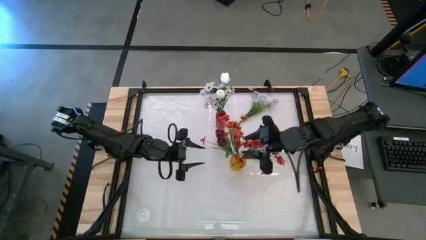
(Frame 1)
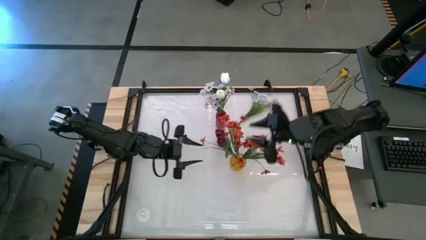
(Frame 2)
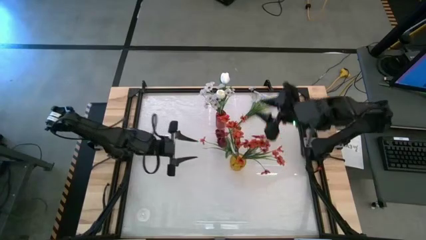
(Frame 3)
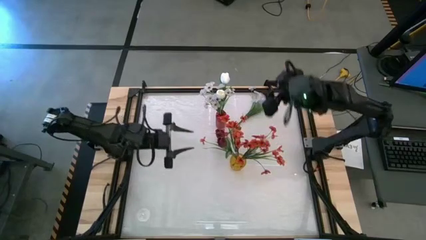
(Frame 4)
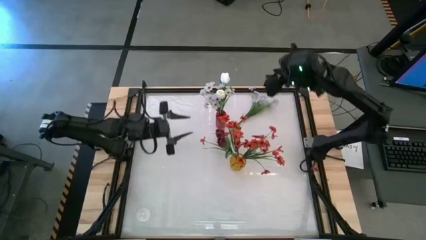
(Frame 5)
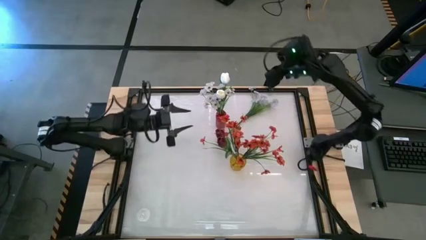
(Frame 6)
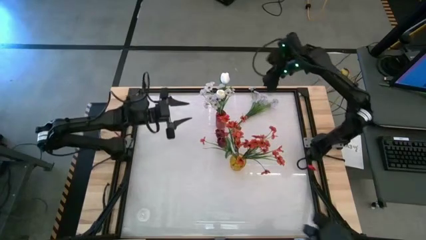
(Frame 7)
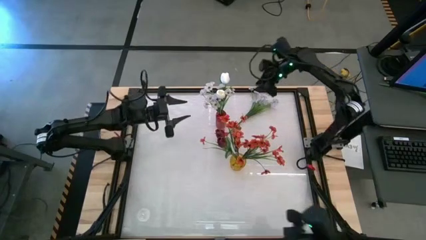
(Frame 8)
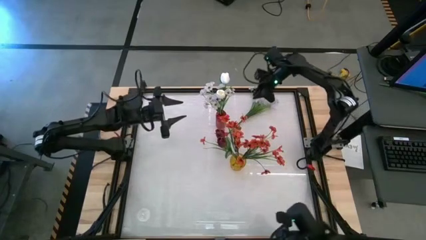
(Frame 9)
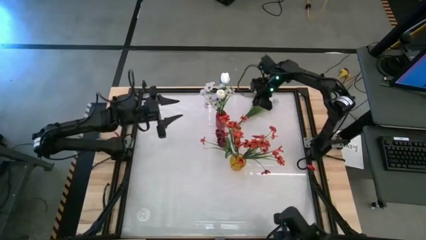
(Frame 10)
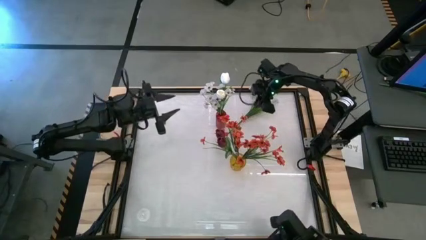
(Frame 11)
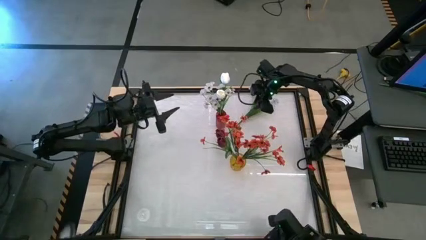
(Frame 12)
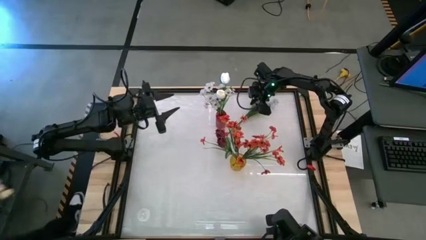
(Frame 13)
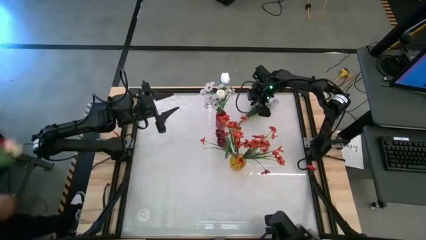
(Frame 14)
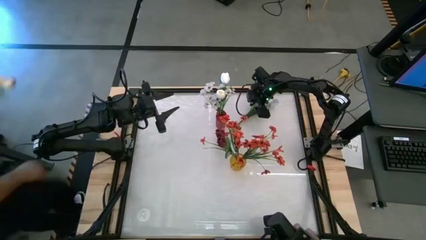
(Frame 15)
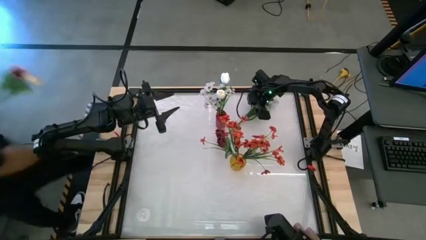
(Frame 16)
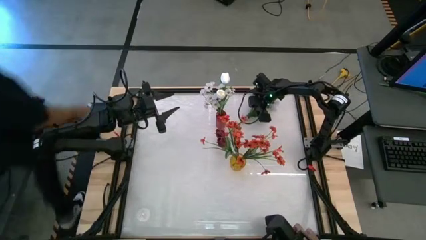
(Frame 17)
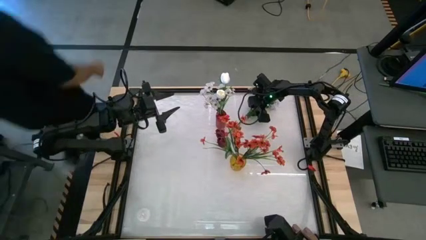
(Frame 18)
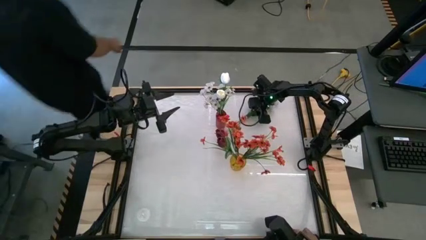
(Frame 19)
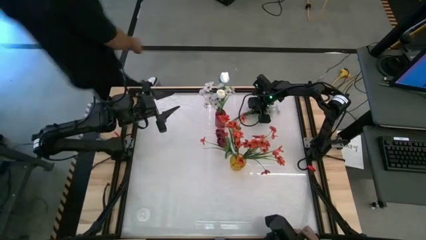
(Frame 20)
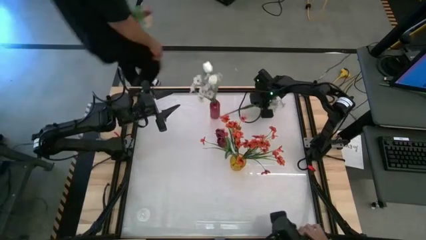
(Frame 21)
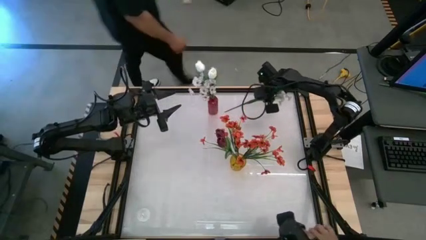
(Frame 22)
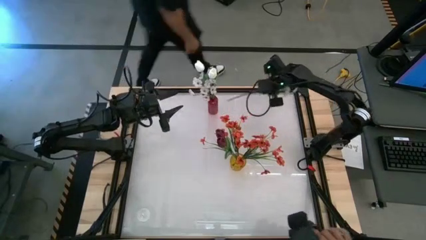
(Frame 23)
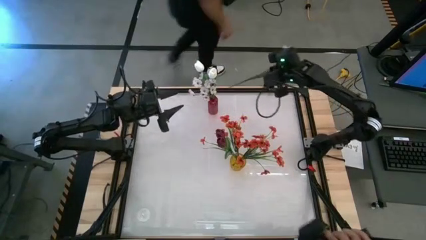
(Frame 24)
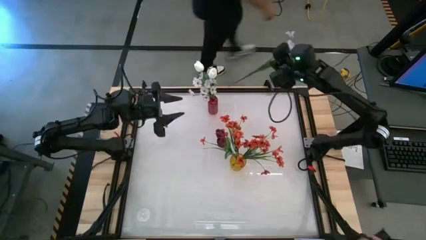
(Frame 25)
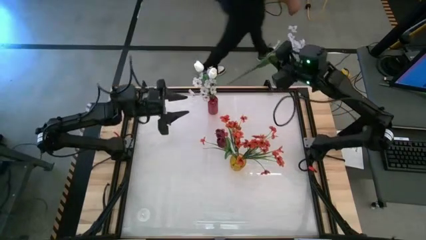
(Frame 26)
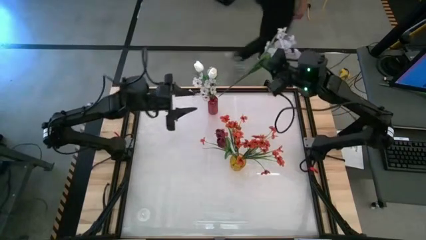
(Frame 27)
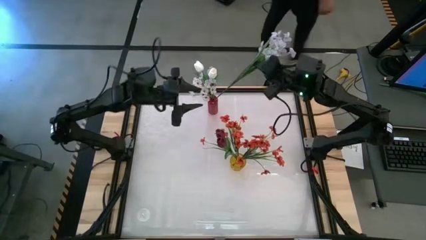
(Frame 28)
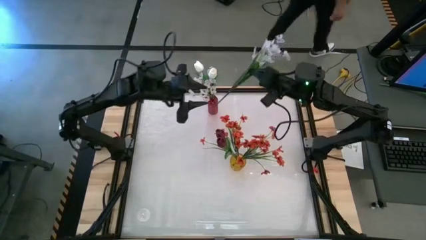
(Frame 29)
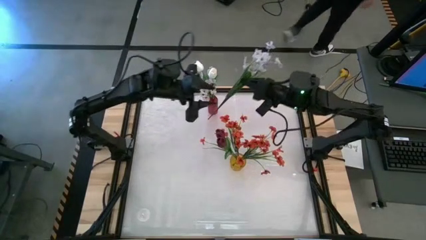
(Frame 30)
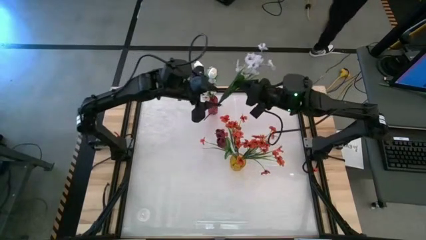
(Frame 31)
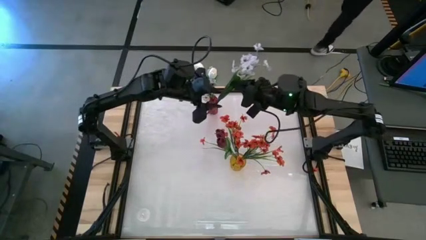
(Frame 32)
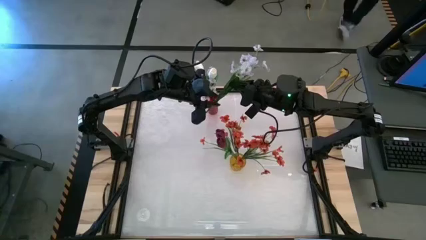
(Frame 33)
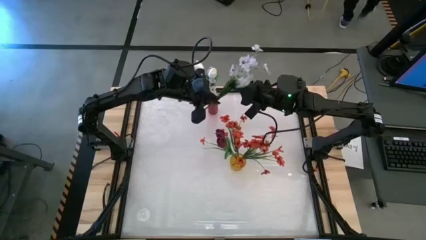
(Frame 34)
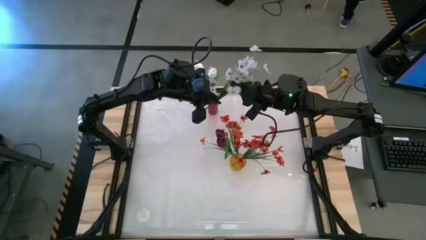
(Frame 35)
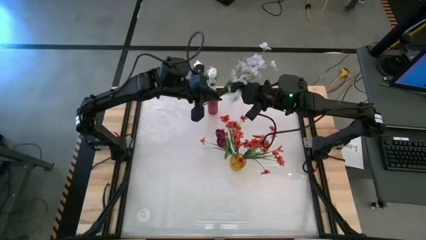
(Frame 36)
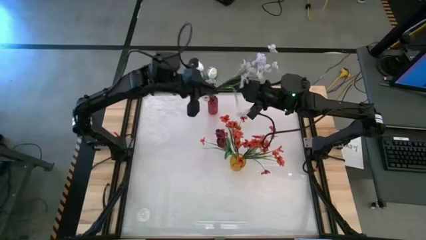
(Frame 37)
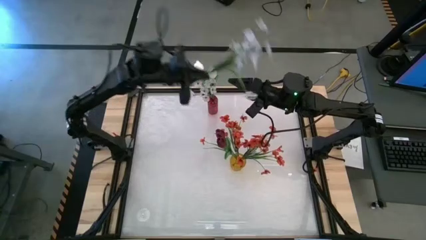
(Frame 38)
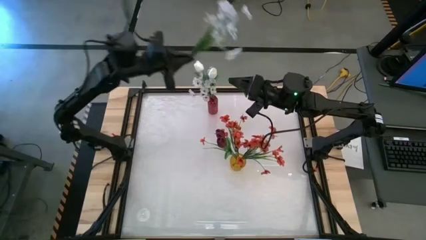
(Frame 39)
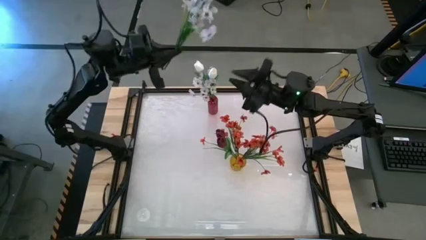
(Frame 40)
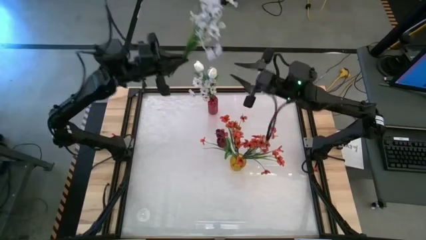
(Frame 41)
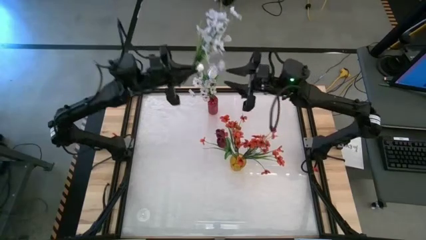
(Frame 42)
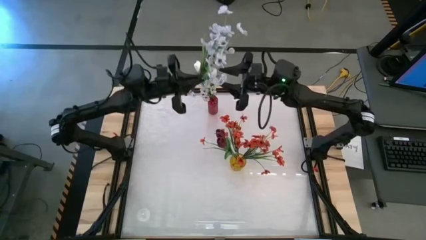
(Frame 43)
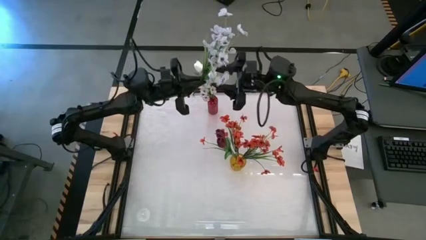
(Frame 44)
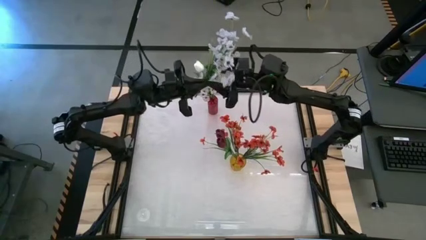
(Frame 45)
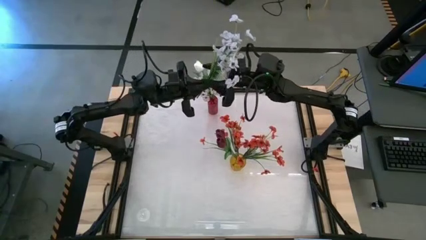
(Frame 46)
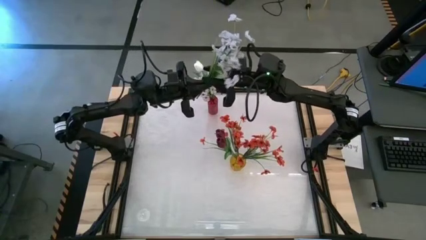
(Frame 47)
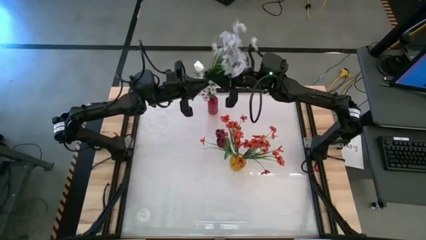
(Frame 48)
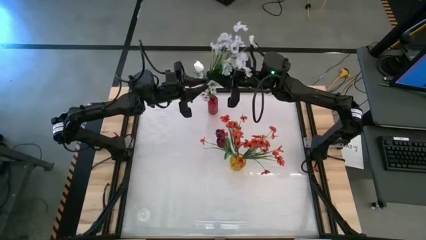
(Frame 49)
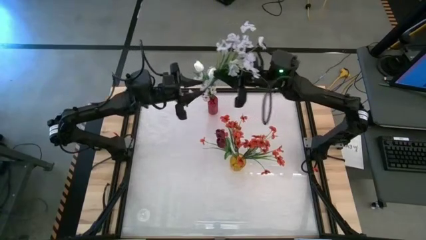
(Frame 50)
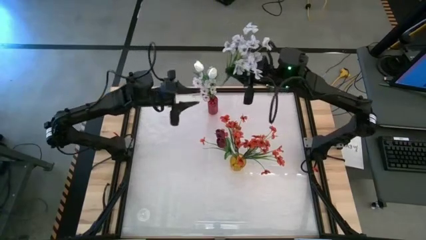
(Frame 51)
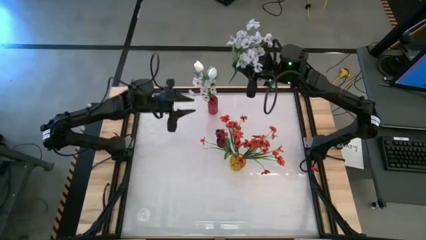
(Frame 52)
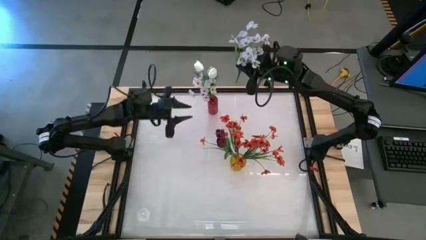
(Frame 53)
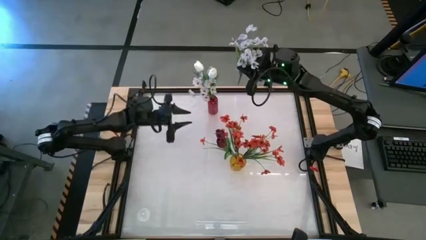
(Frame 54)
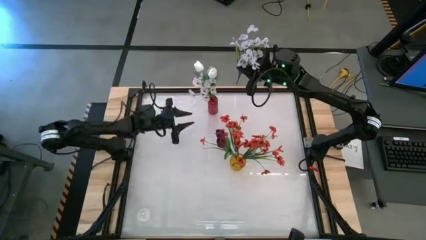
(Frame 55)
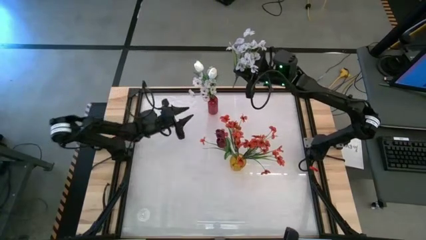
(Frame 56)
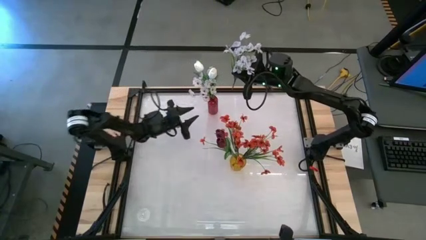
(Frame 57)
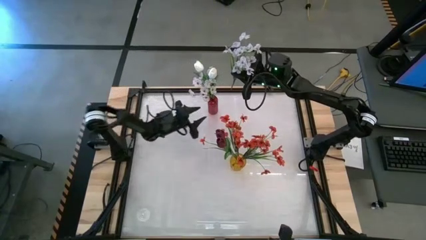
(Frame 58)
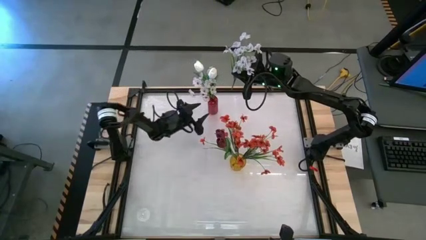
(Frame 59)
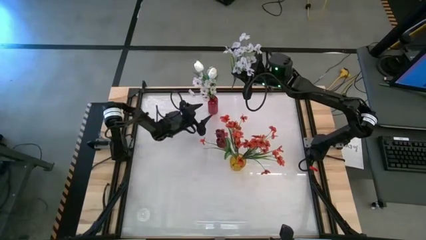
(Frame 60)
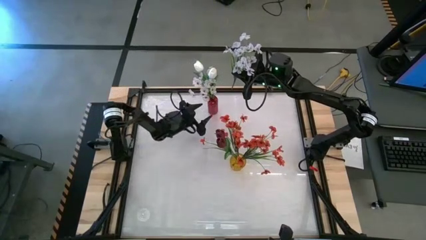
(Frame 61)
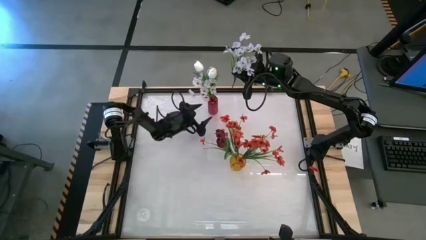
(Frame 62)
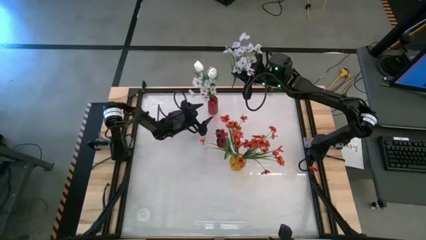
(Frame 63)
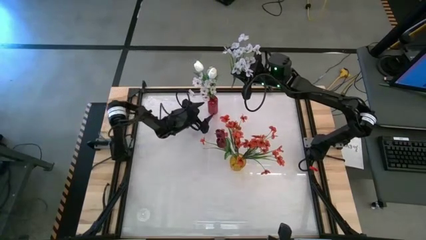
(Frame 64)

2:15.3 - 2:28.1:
Task: Sort flowers into vase by color
Put the white flowers into the red vase

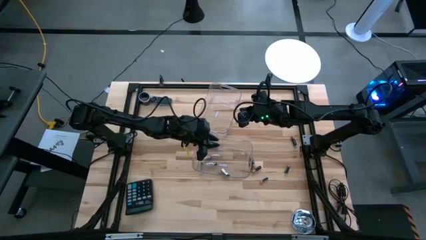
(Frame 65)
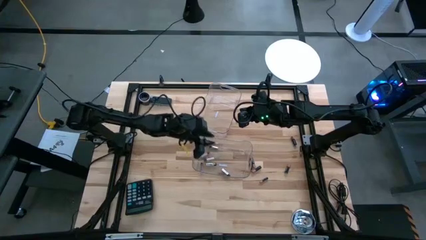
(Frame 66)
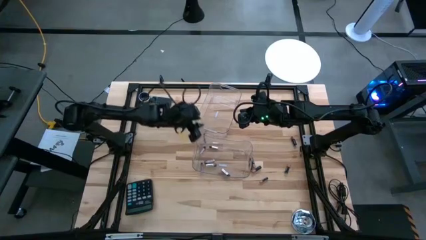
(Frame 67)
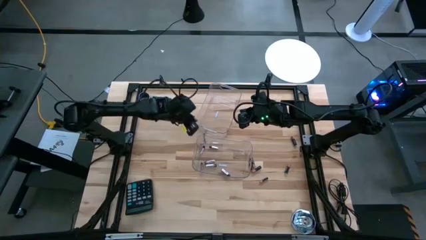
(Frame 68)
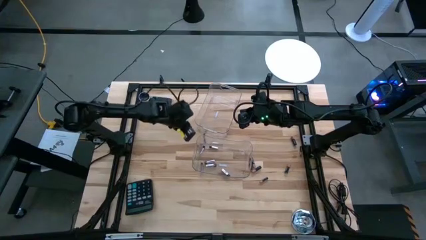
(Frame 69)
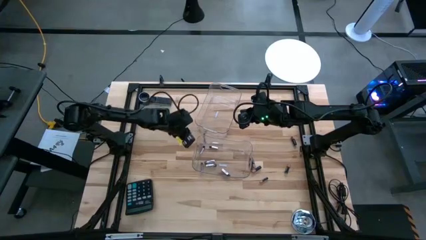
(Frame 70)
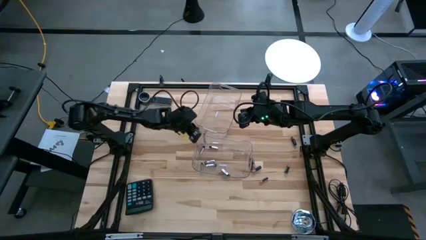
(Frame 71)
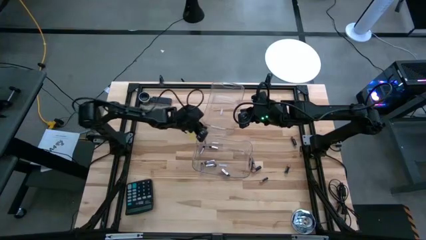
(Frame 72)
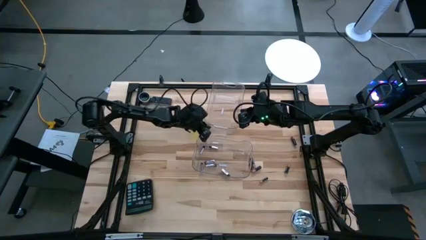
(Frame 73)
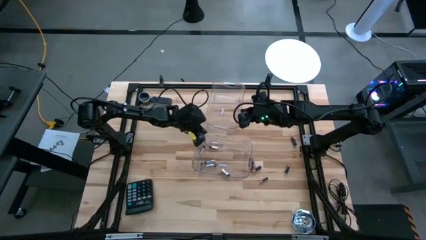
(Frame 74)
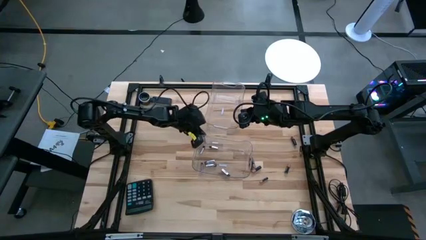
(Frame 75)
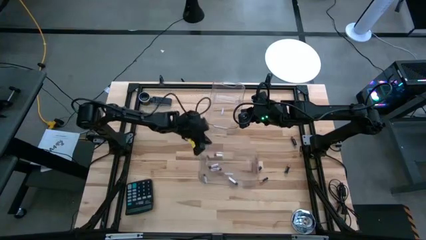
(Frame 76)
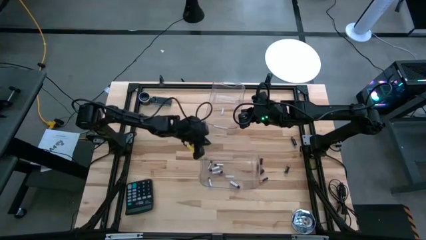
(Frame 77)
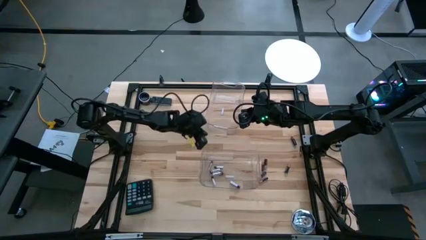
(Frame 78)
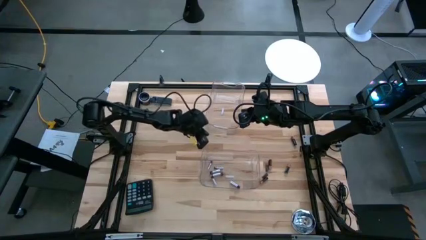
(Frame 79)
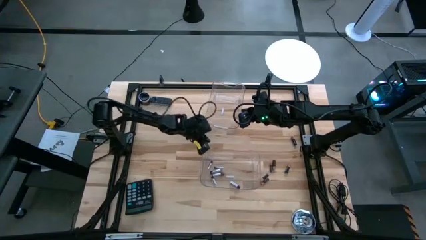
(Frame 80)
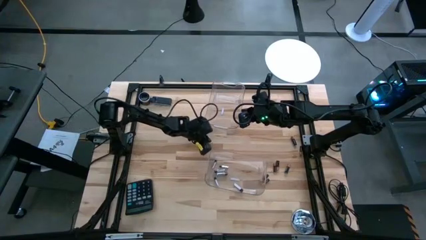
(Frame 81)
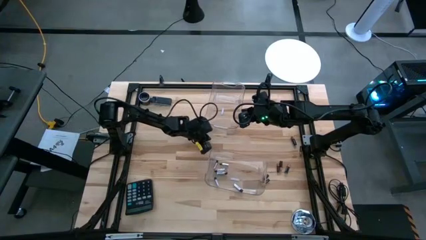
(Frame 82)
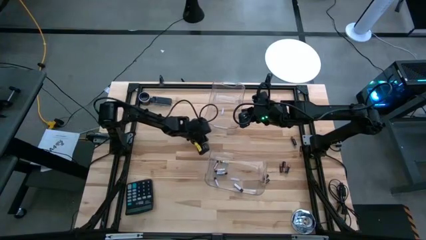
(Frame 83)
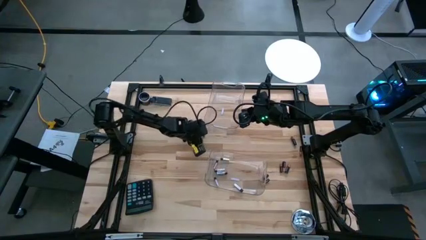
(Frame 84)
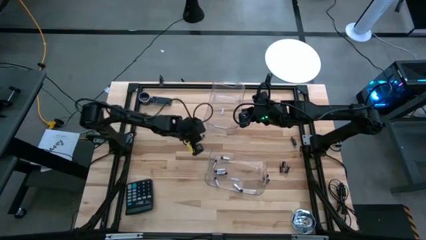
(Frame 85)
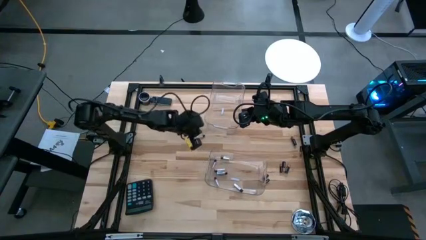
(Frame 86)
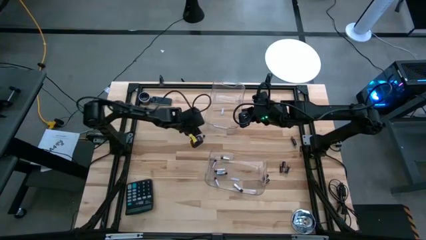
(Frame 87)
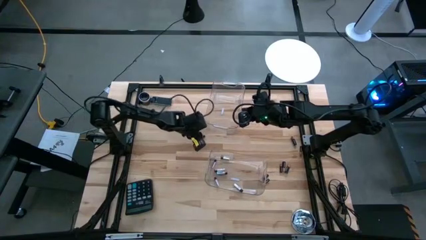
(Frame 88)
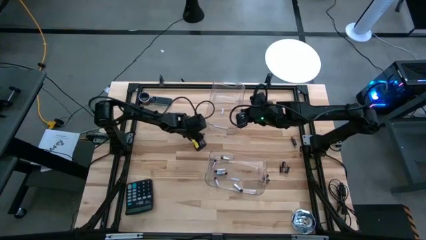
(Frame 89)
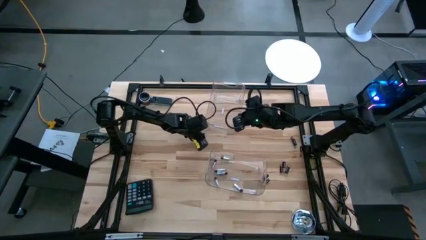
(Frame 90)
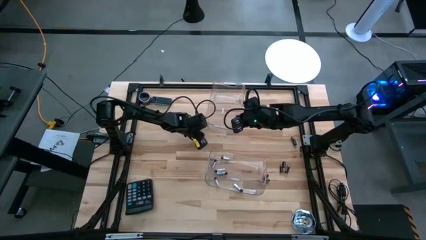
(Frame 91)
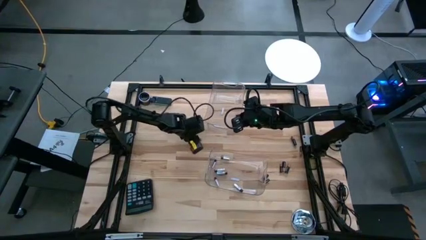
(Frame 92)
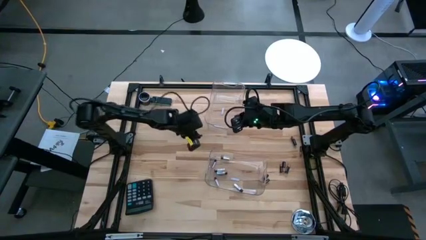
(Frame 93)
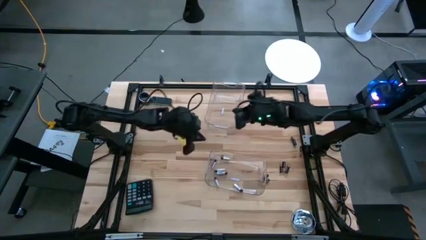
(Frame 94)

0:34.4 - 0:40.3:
Task: Sort batteries
Put the silver battery into the bottom transparent bin
